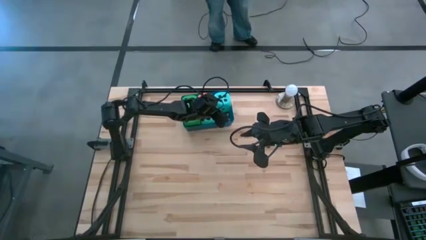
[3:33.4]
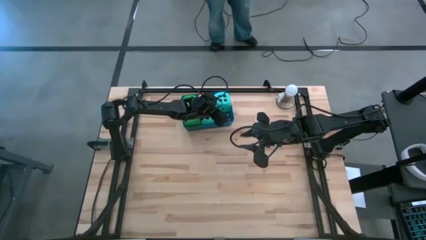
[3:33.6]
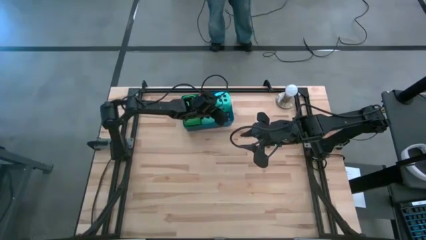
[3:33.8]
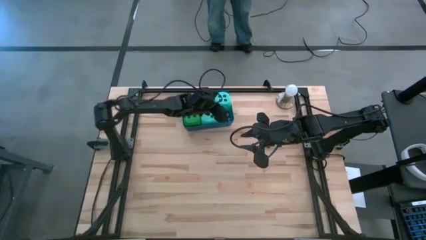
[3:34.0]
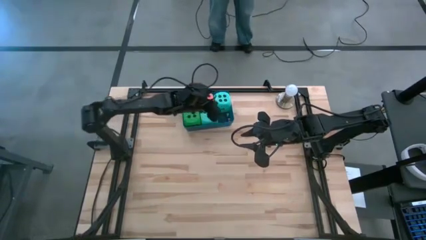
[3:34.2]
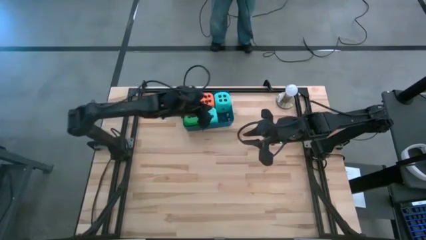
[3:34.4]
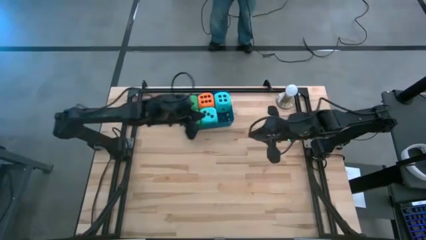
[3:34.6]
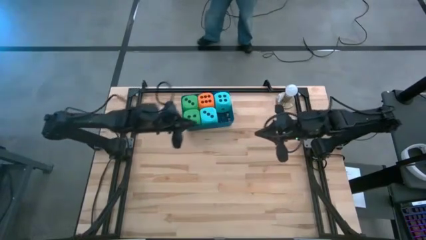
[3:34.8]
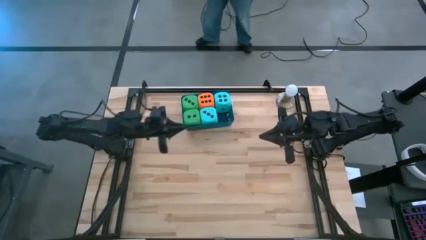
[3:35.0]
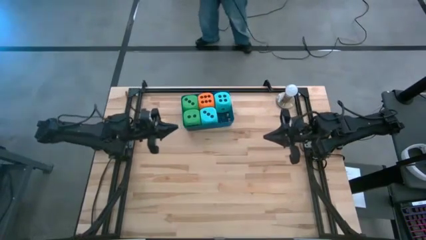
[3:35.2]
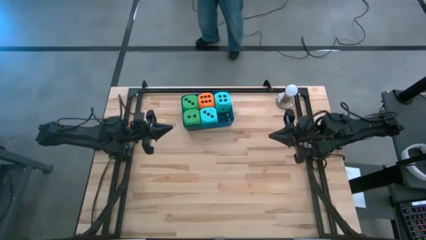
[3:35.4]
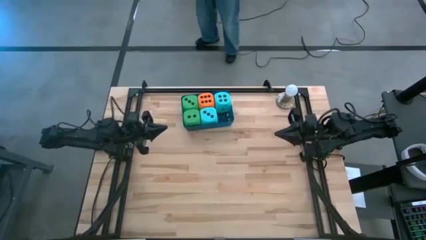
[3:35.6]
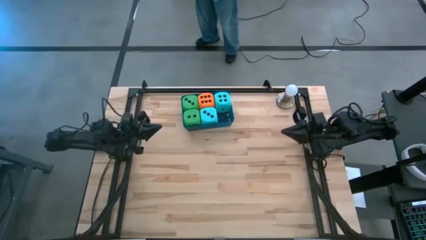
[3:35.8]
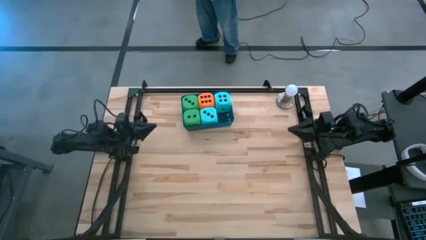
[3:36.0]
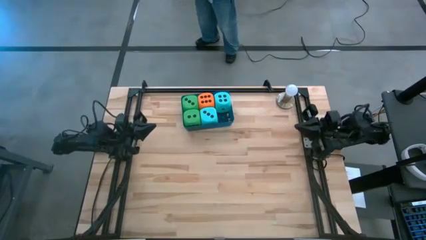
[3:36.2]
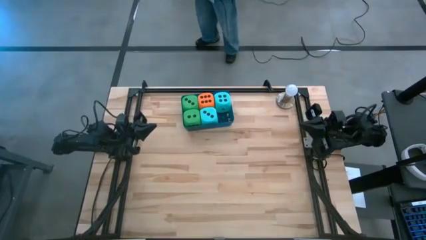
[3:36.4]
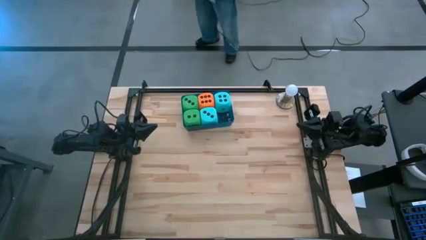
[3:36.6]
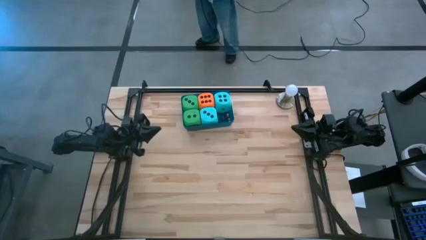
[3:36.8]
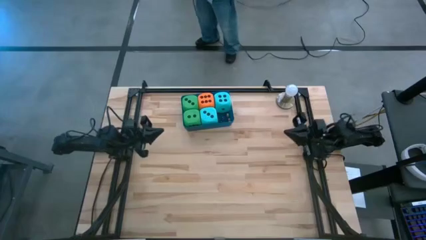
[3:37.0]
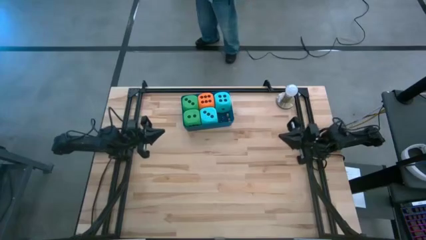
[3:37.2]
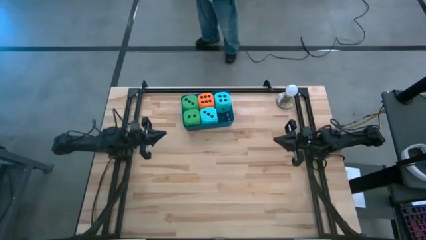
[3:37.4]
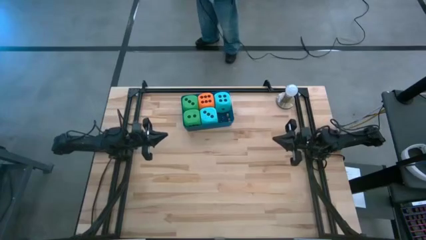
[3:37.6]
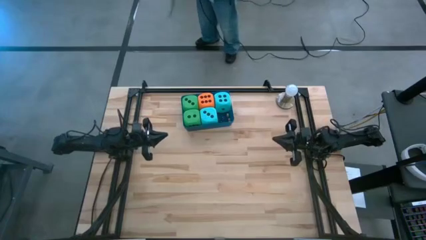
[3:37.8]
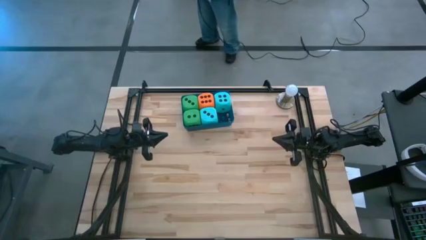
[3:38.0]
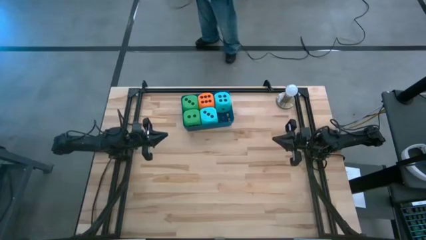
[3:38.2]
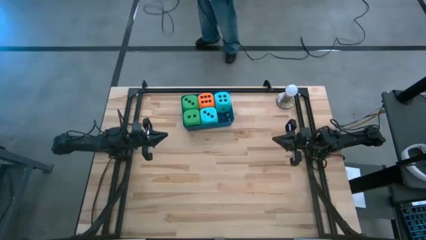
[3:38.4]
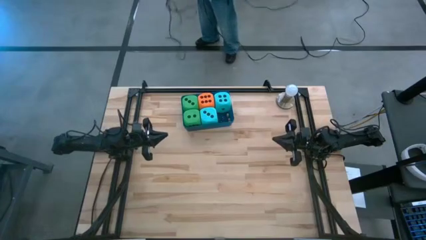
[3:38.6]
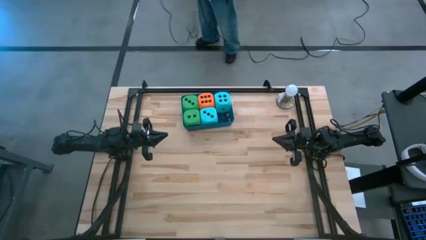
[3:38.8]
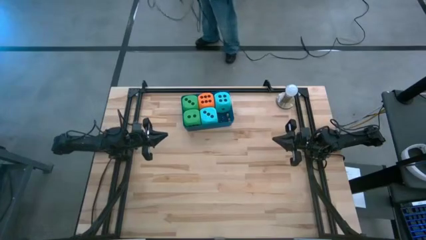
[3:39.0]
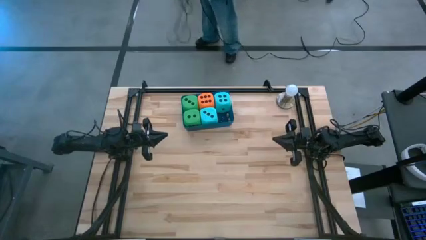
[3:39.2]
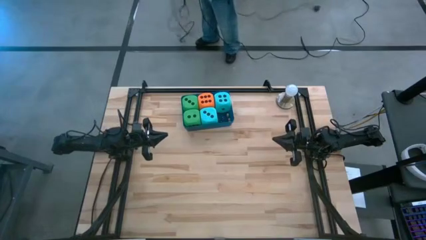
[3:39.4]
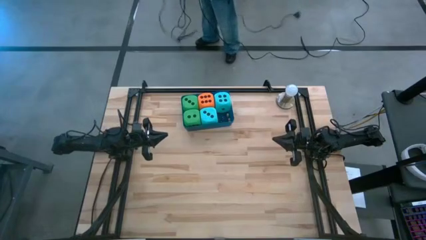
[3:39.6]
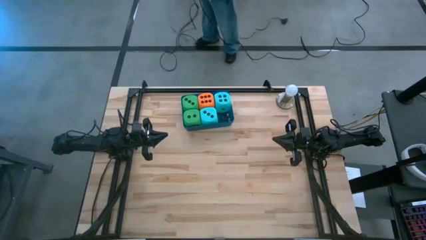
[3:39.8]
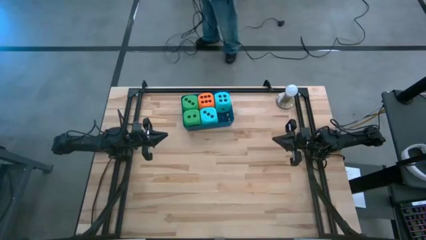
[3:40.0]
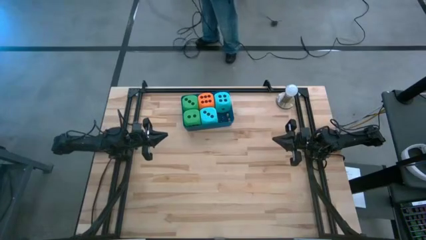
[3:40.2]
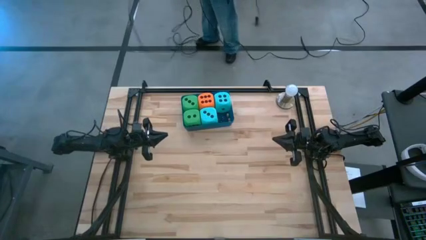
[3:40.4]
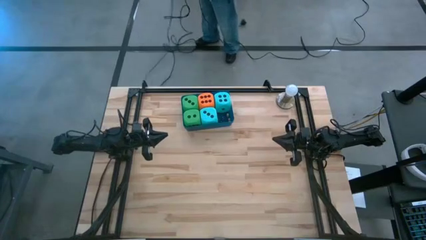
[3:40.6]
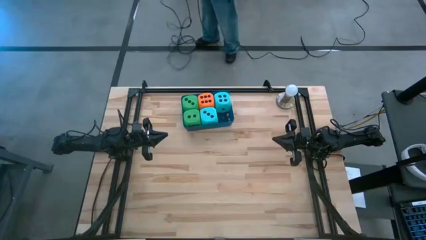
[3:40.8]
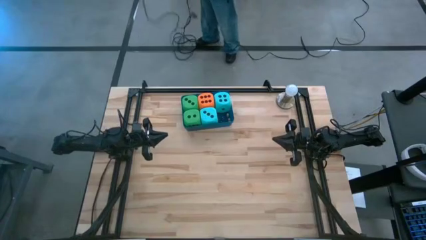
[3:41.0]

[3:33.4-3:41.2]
Task: Pick & Place Dice
Return to Home Position

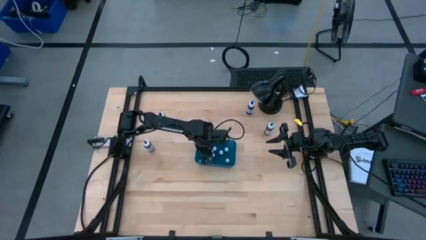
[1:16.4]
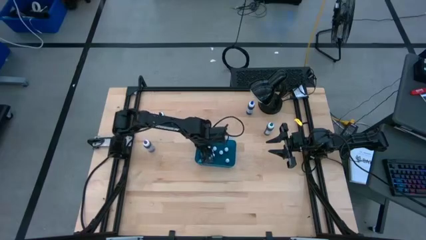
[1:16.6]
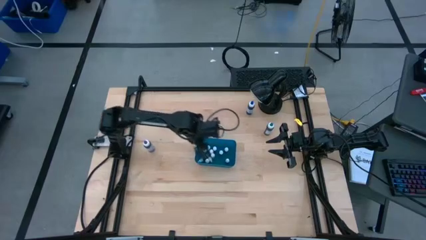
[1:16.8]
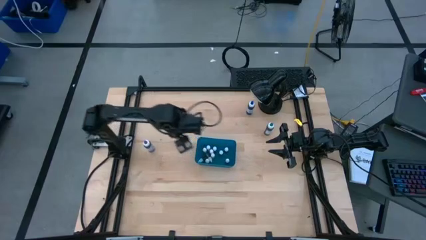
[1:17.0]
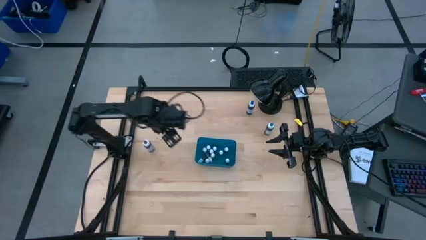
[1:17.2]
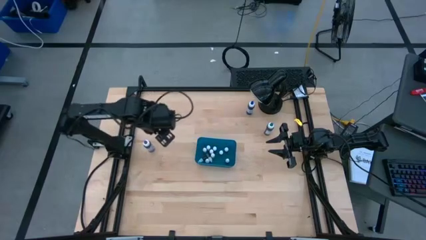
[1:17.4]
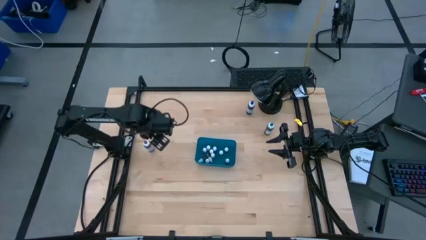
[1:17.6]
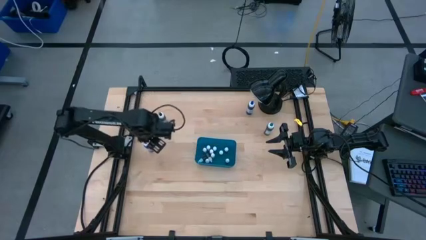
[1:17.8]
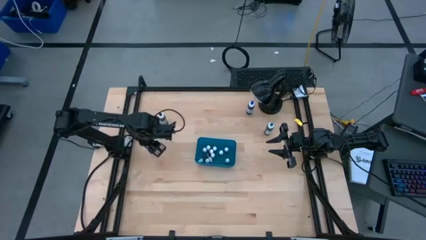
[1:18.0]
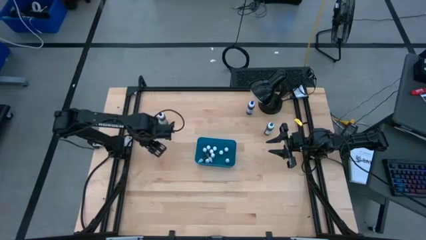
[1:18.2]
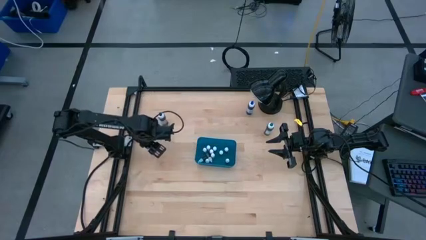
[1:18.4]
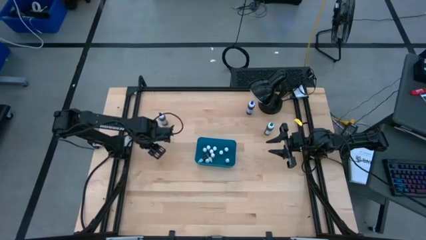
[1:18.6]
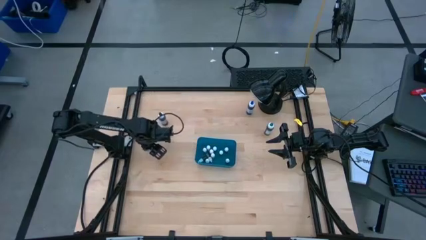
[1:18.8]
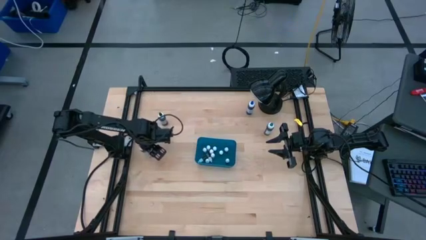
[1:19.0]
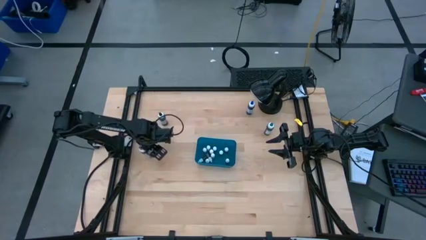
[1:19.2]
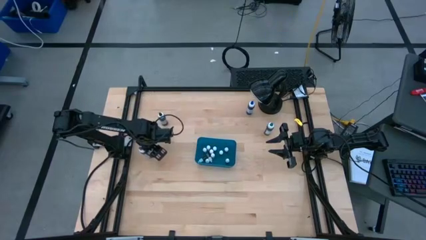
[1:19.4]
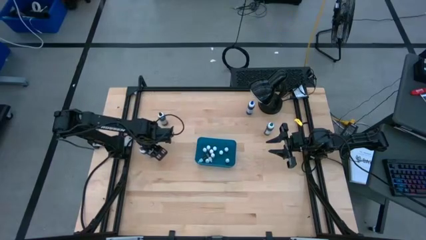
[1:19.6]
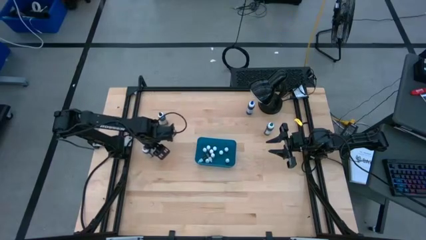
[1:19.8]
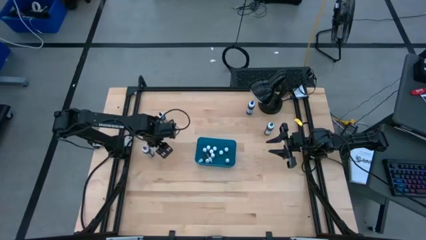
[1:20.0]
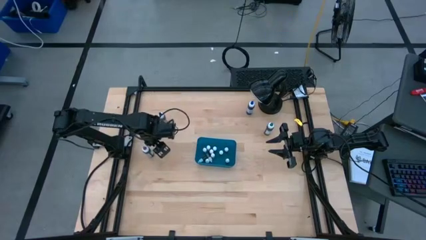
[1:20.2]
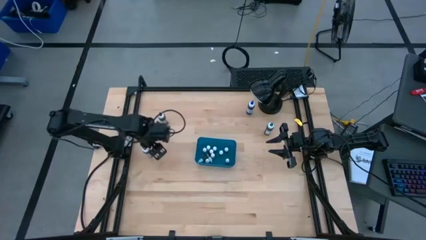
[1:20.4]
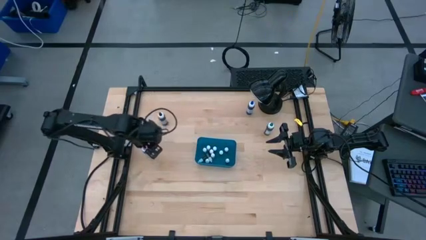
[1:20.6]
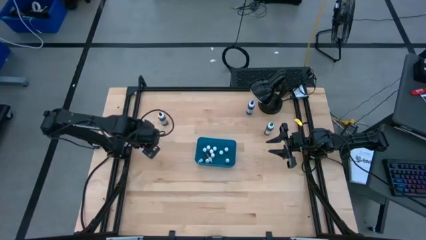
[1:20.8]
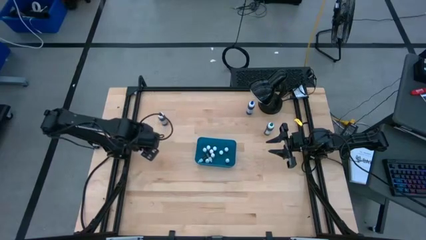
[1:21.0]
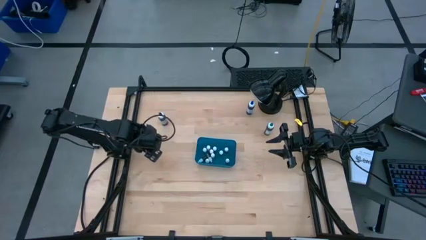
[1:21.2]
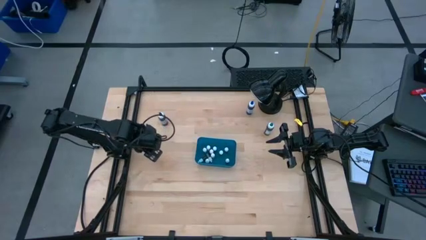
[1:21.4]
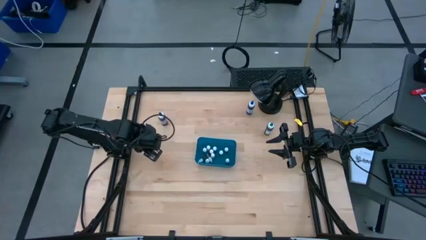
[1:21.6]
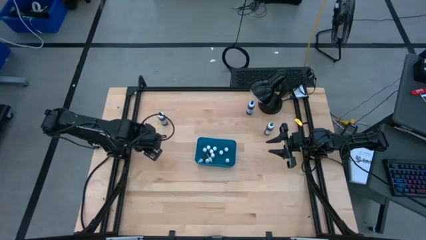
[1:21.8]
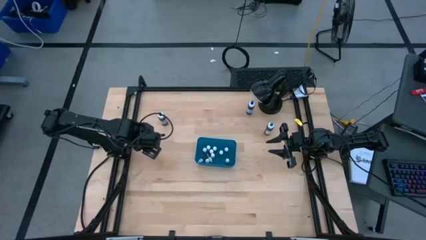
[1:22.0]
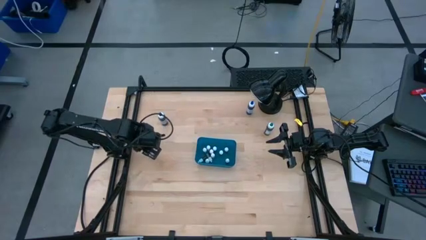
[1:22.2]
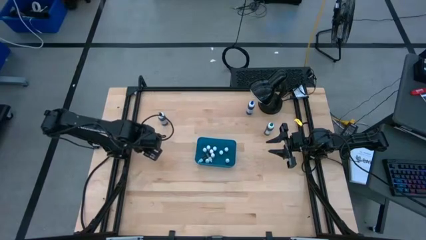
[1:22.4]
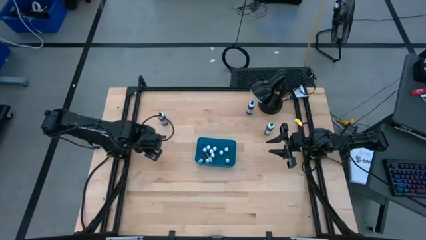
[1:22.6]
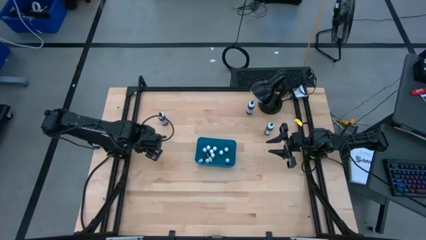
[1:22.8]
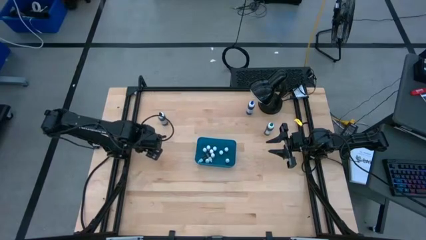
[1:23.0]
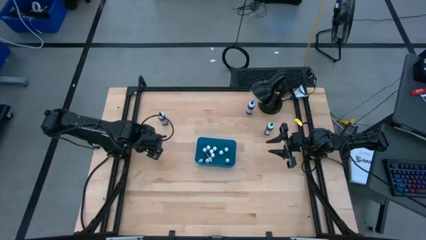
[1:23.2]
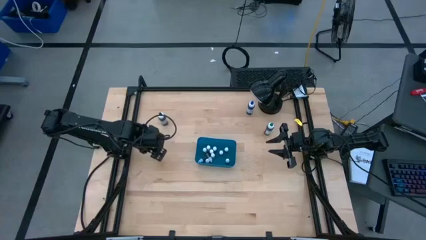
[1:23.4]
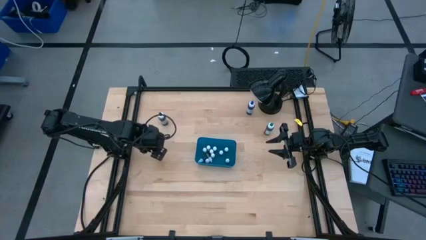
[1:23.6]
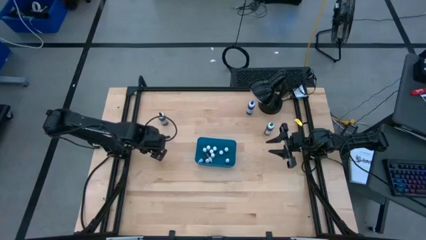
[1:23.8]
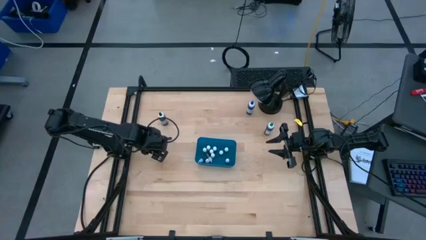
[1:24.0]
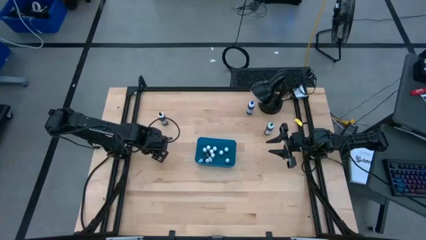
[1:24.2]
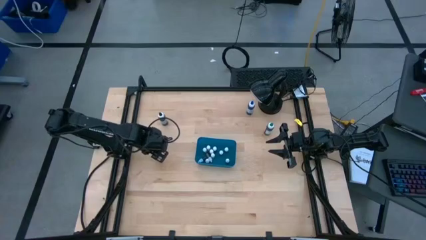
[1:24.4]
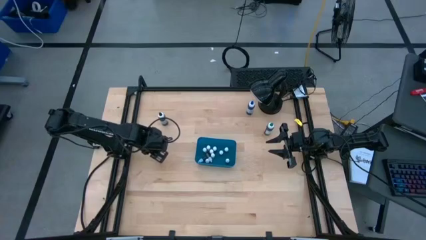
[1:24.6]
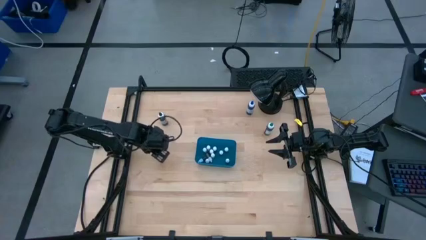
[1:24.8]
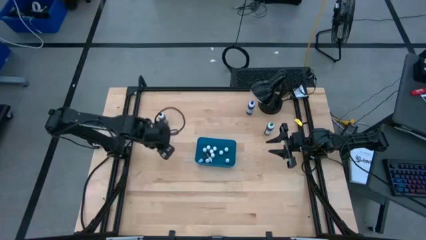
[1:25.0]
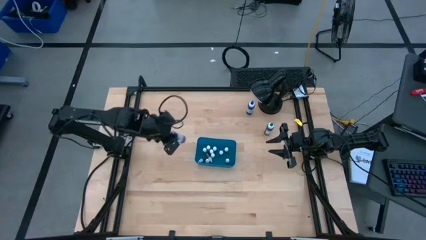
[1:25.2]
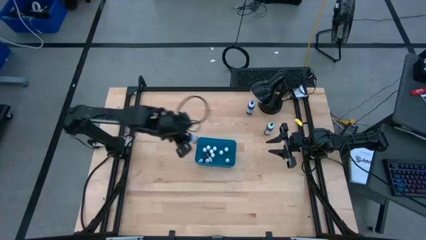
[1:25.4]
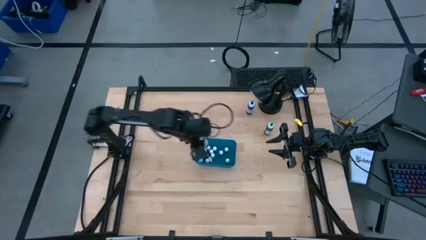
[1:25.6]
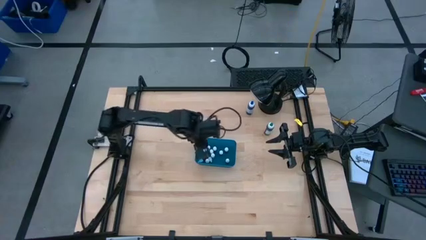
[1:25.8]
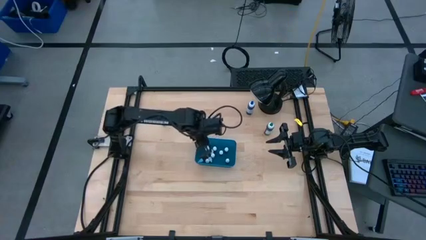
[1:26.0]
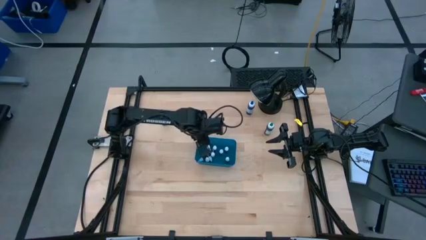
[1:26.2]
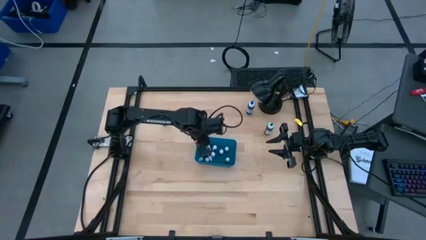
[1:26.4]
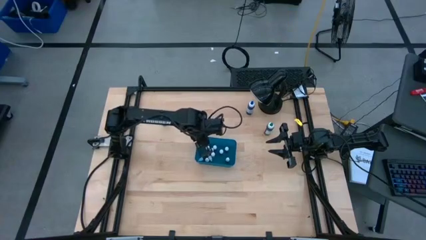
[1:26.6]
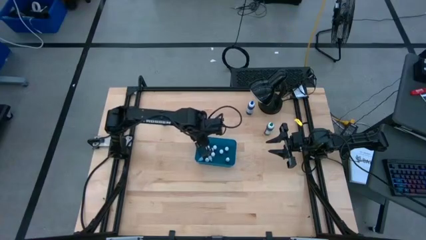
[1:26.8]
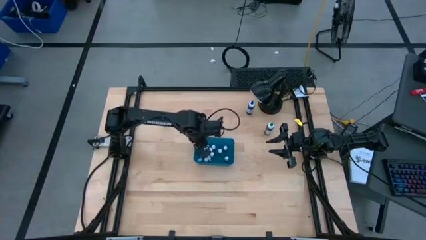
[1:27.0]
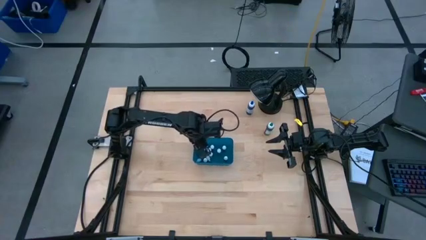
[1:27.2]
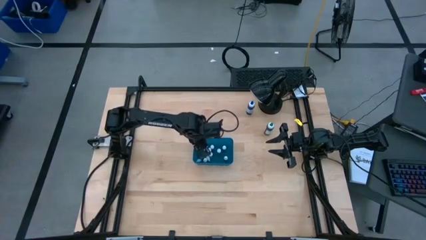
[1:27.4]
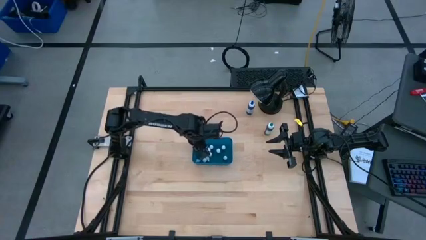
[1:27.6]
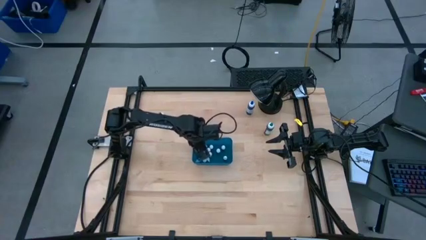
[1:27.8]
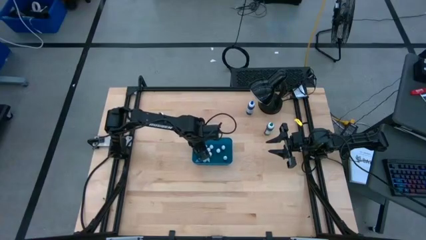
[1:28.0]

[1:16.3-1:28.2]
Task: Pick & Place food coloring
Put the small purple food coloring bottle into the blue bin
